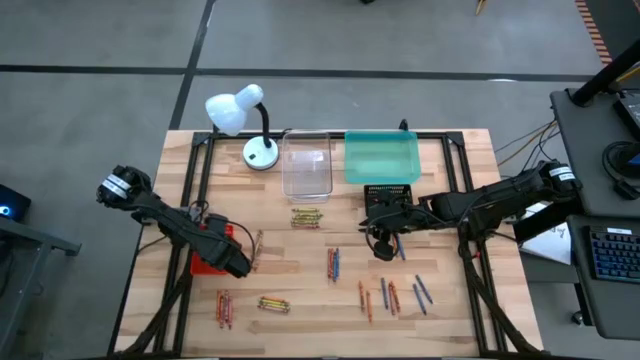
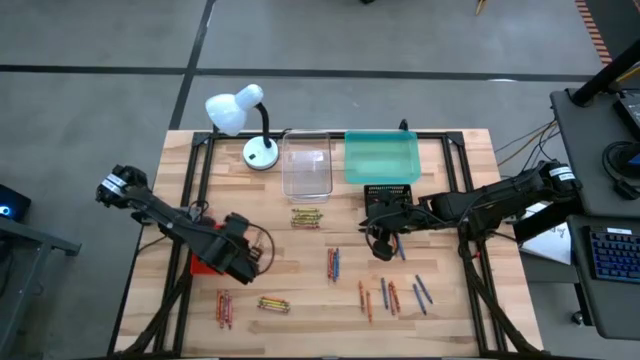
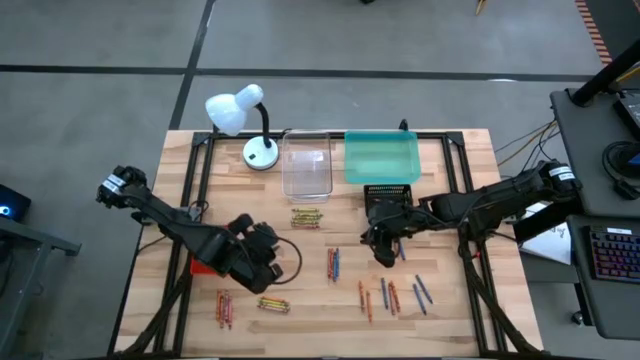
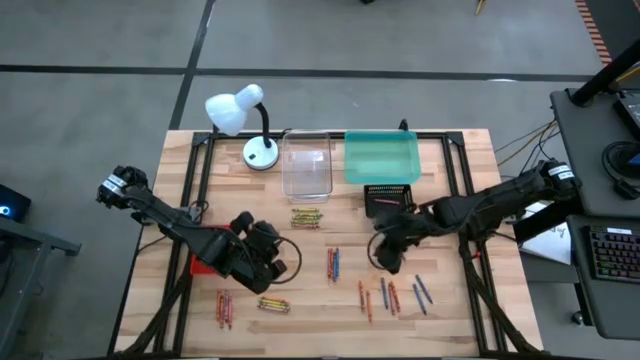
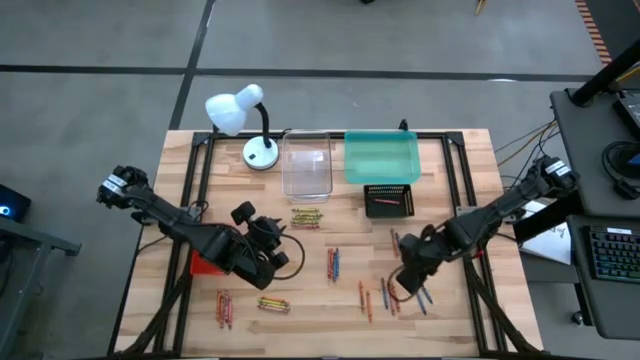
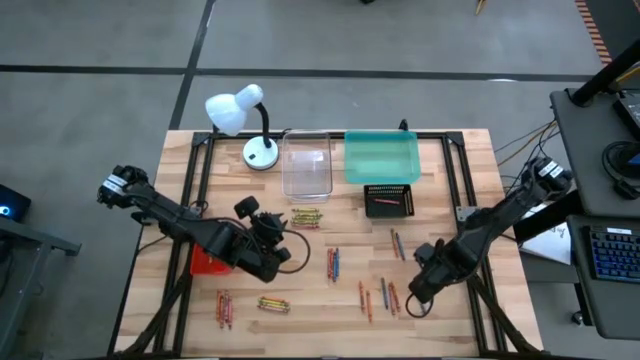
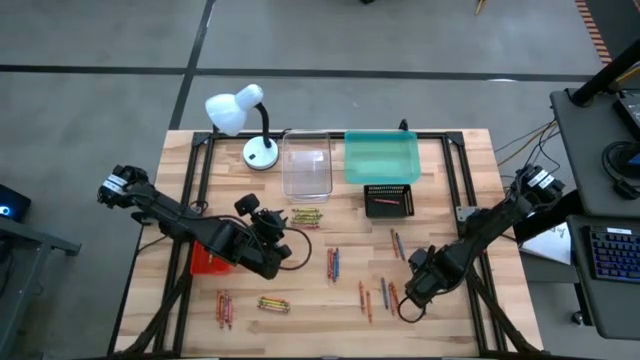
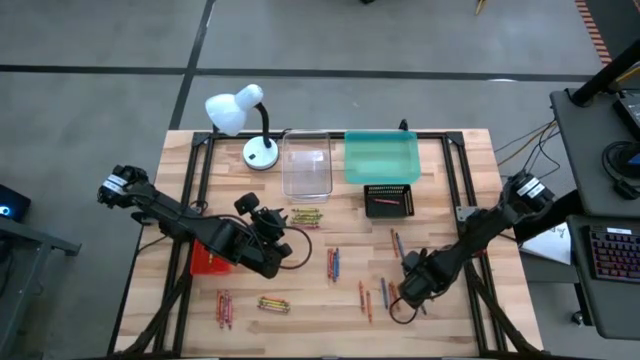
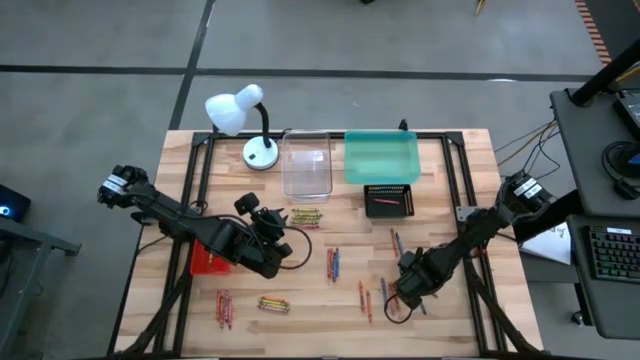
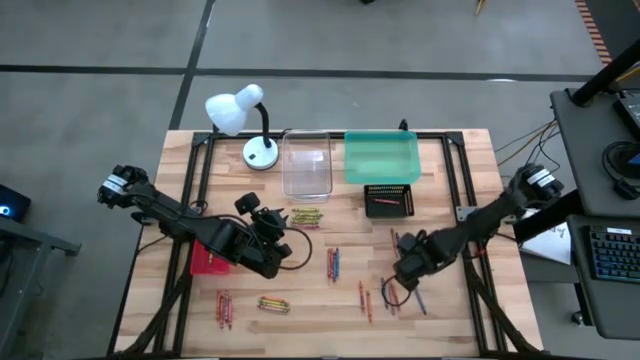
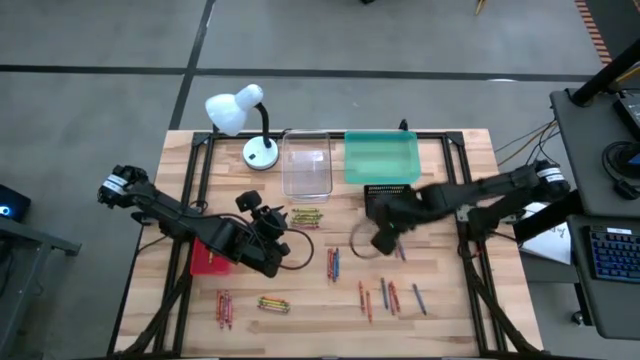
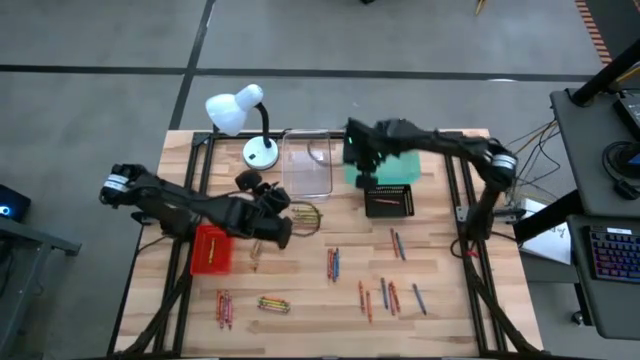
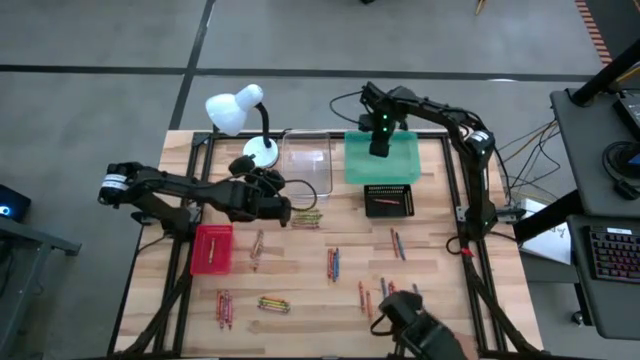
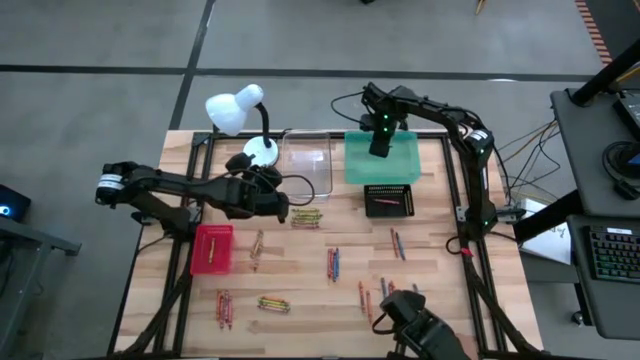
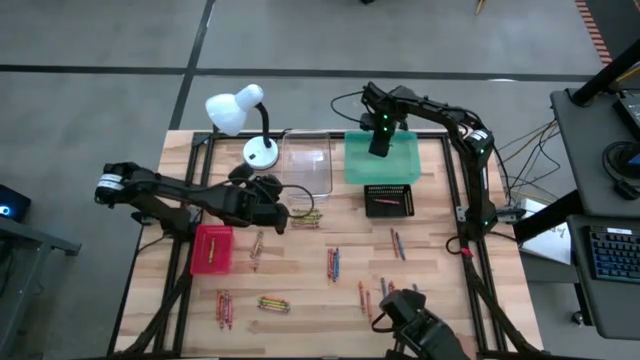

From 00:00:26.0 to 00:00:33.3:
Task: Sort crayons
Put the blue crayon into the blue bin

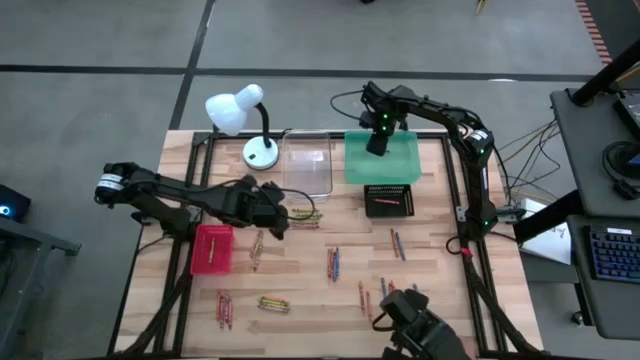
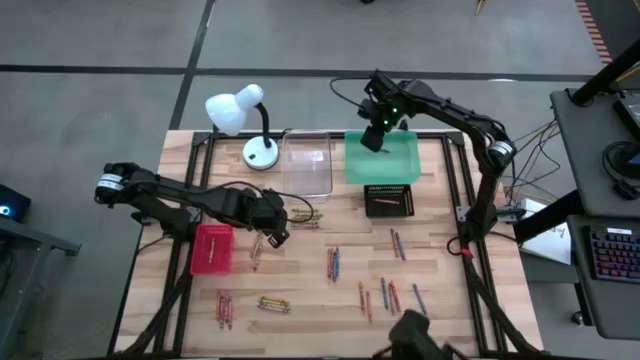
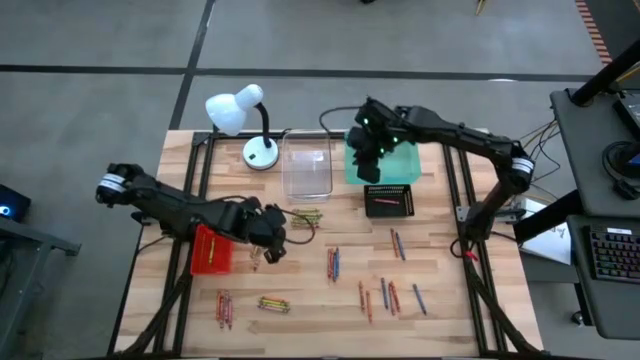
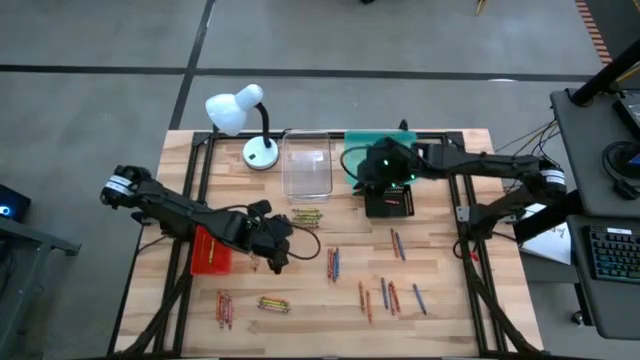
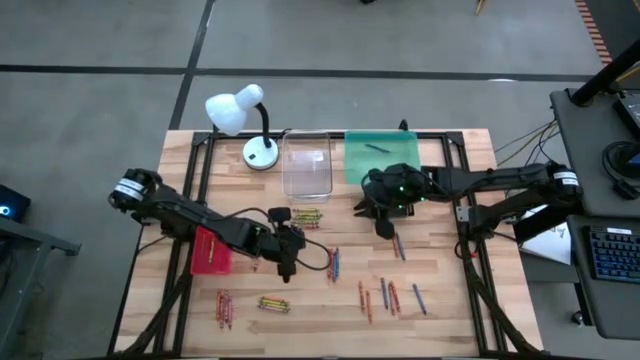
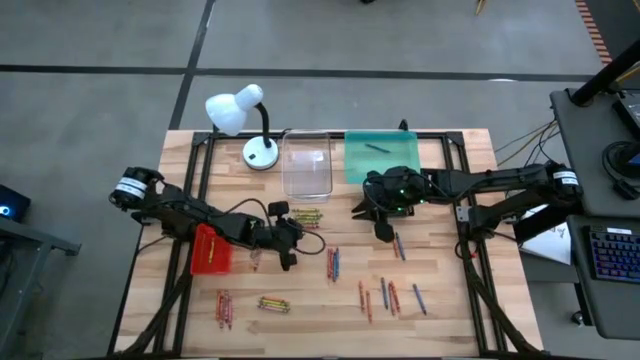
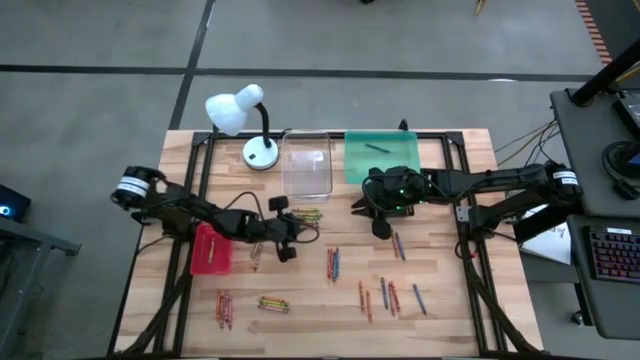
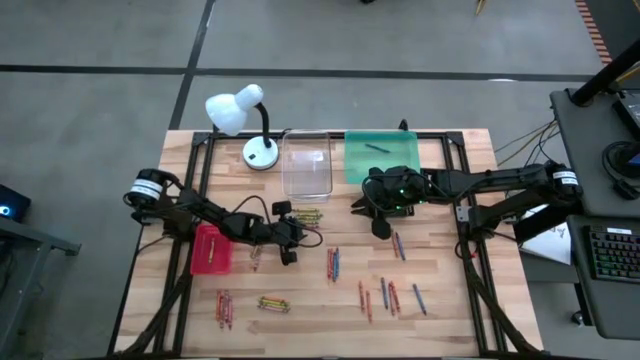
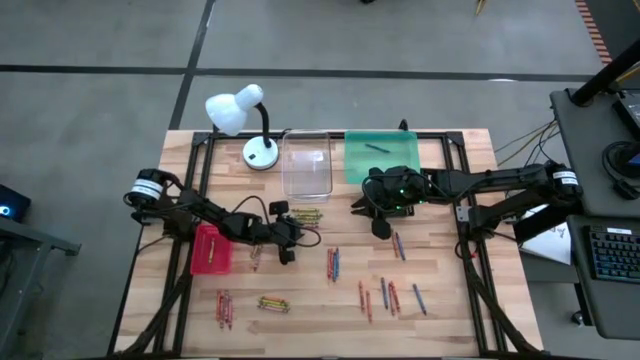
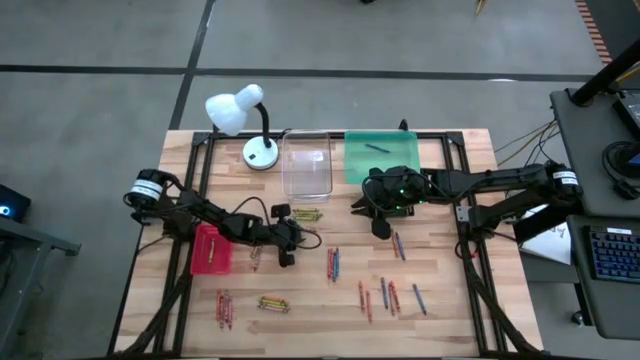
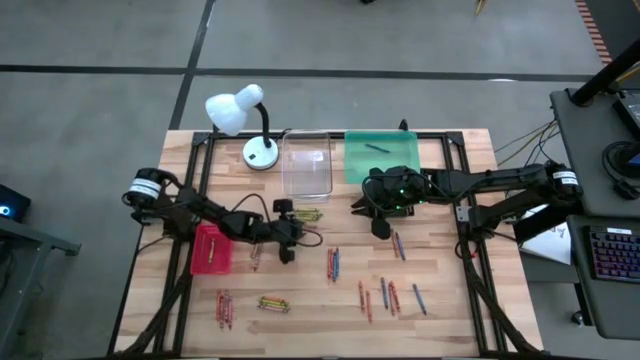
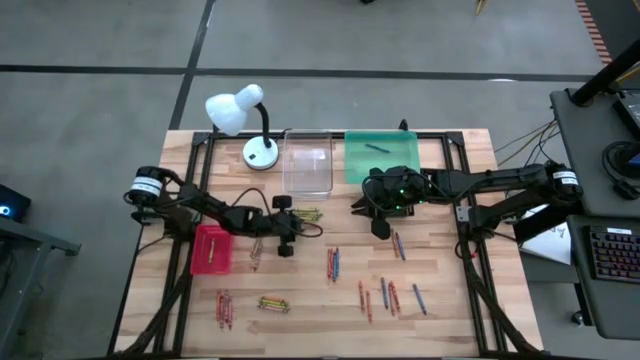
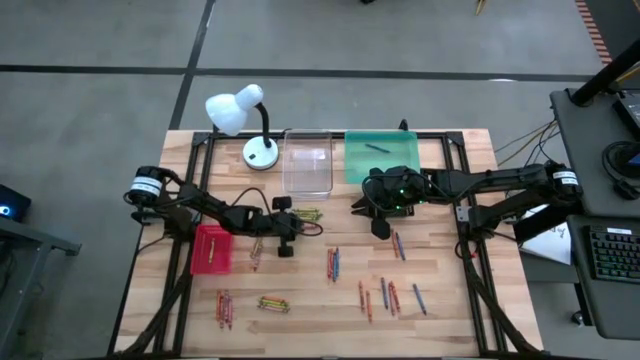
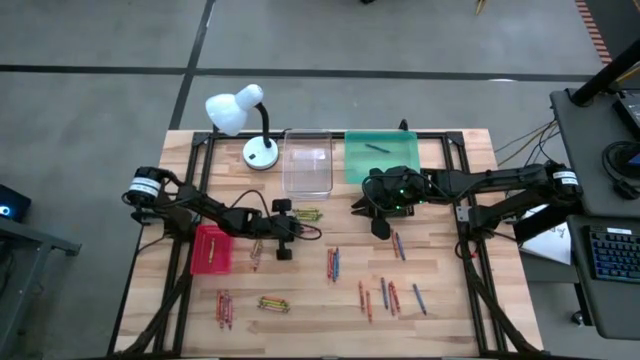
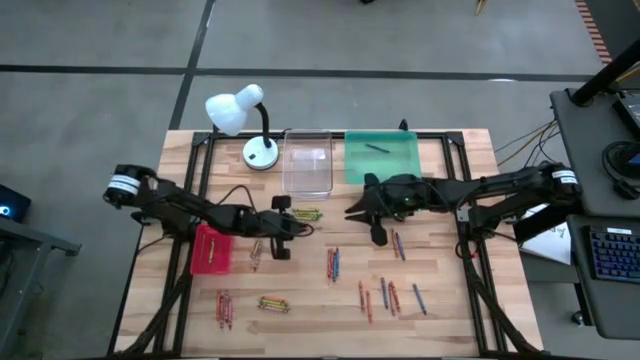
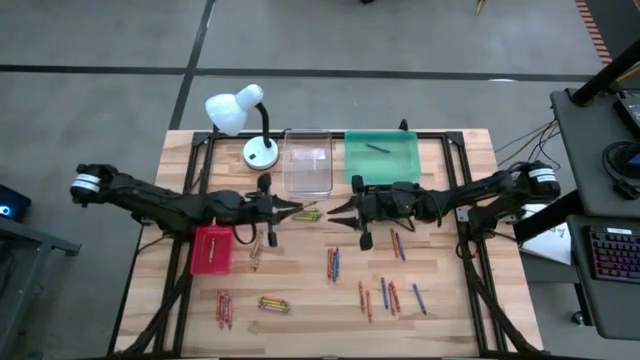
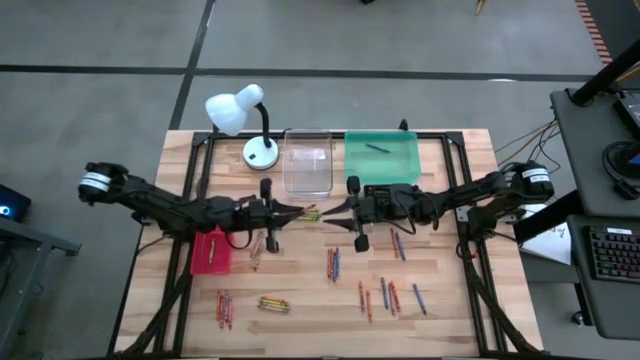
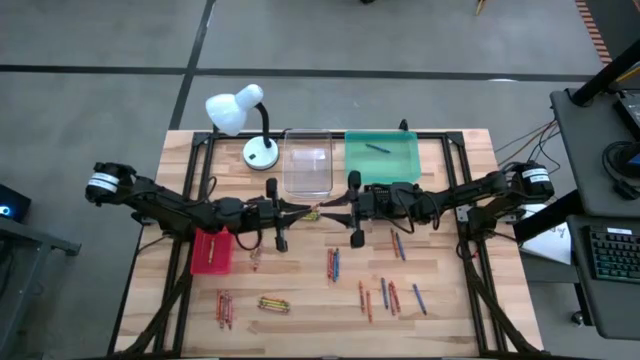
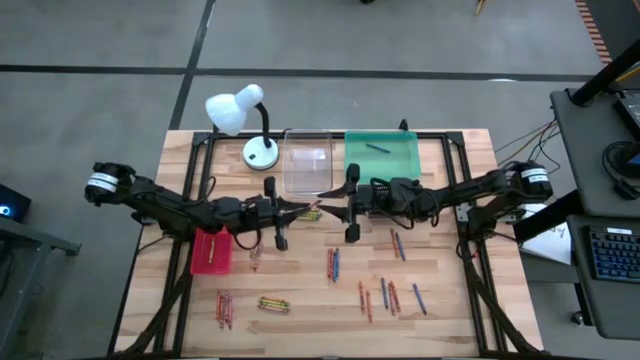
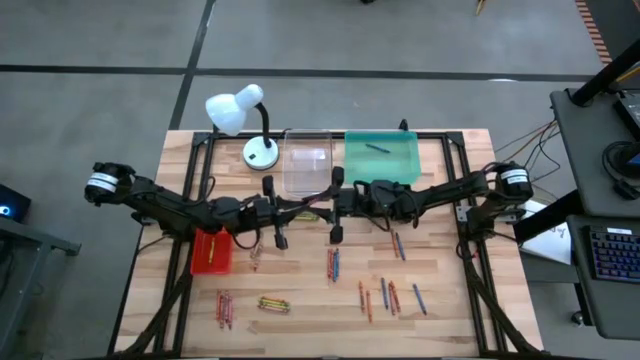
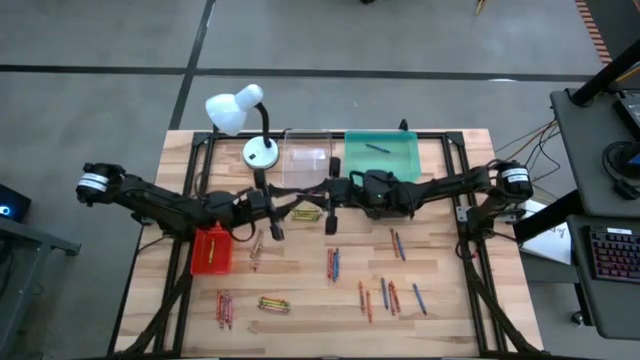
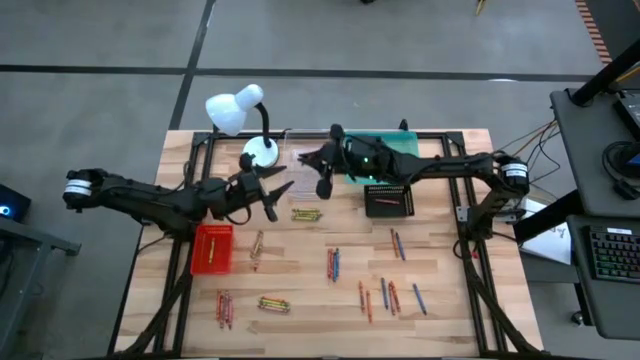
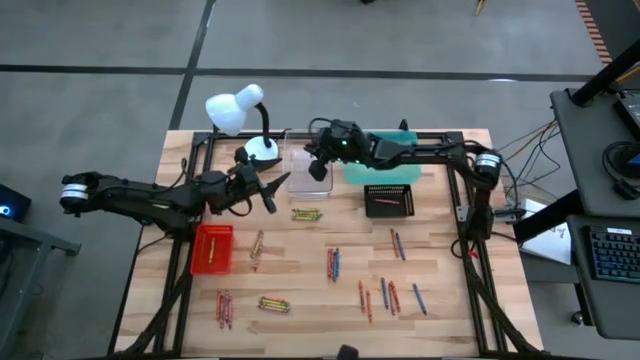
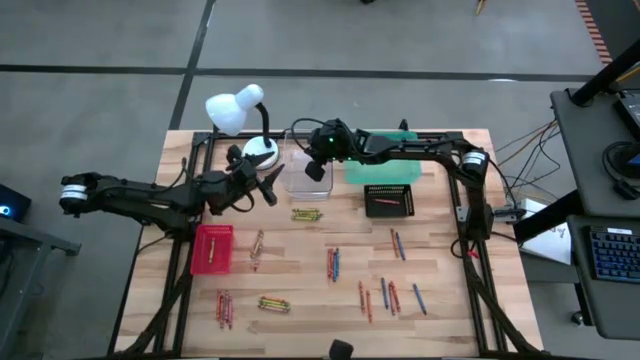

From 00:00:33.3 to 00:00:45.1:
Put the red crayon into the black bin
